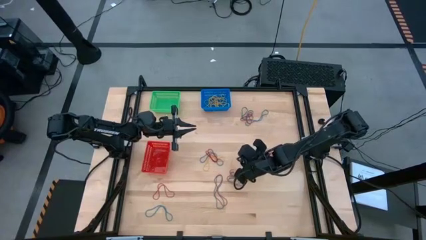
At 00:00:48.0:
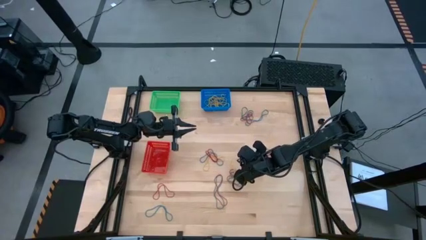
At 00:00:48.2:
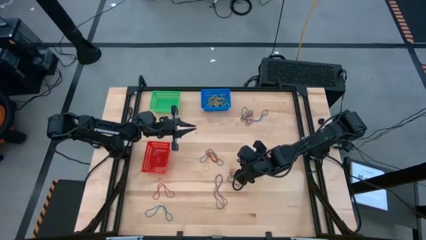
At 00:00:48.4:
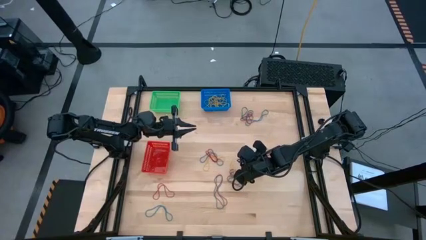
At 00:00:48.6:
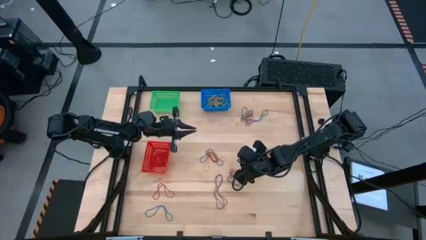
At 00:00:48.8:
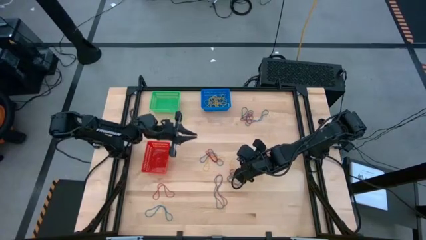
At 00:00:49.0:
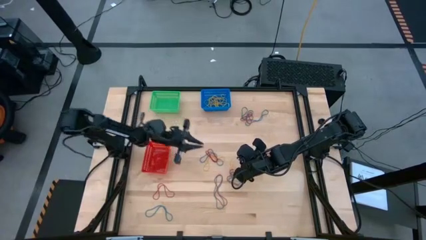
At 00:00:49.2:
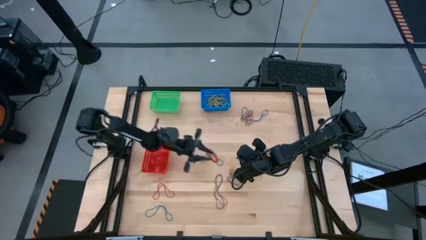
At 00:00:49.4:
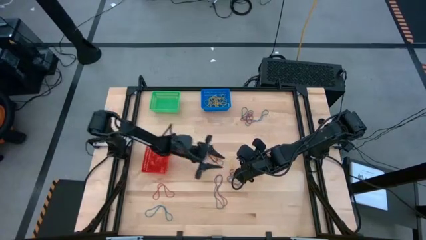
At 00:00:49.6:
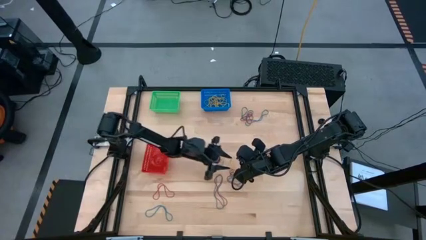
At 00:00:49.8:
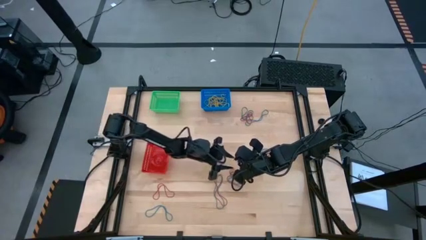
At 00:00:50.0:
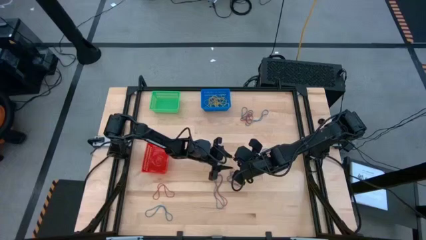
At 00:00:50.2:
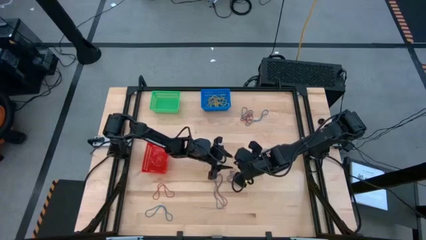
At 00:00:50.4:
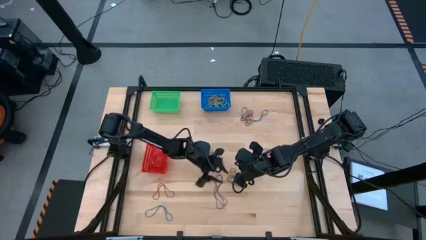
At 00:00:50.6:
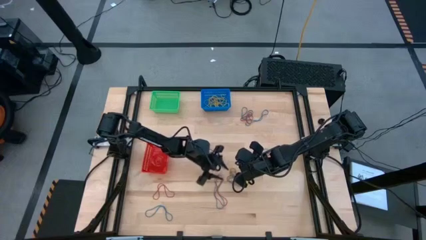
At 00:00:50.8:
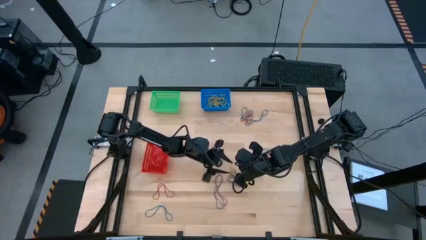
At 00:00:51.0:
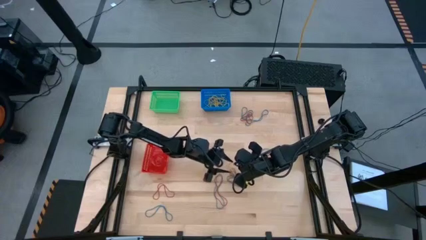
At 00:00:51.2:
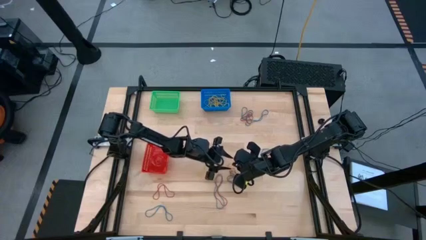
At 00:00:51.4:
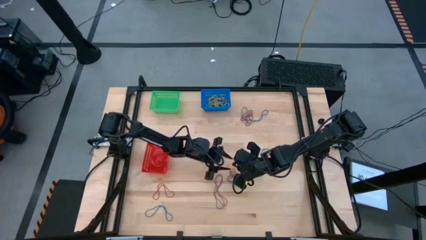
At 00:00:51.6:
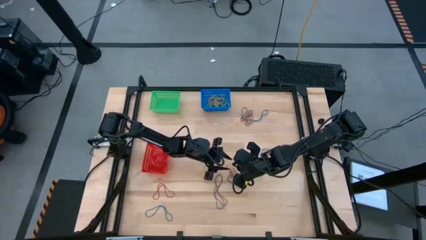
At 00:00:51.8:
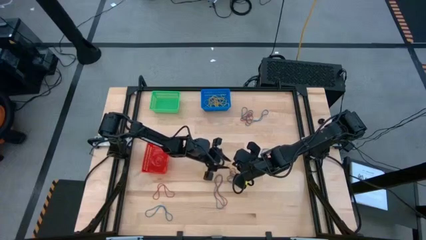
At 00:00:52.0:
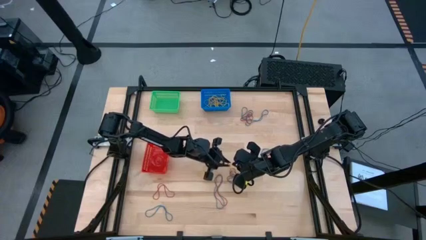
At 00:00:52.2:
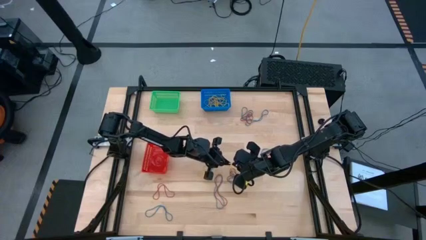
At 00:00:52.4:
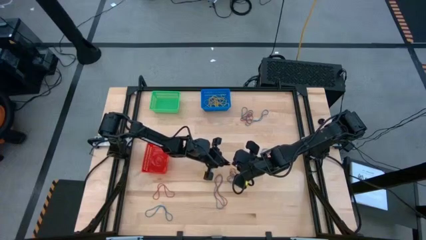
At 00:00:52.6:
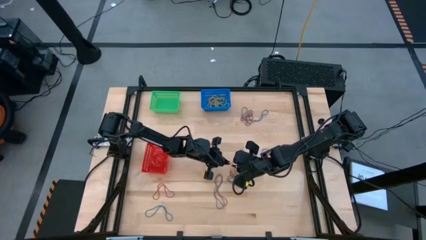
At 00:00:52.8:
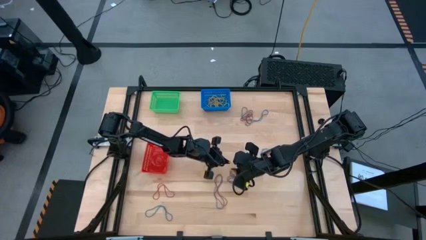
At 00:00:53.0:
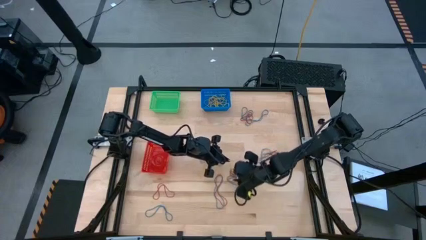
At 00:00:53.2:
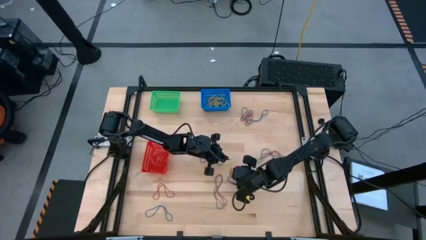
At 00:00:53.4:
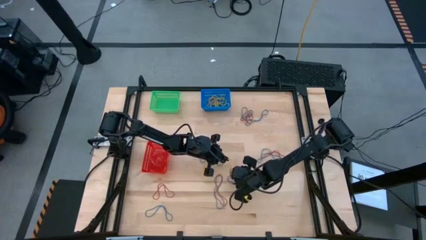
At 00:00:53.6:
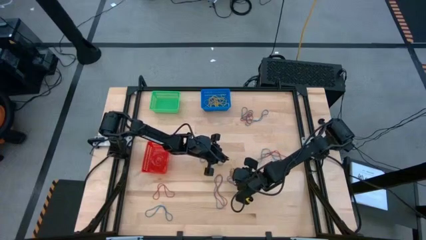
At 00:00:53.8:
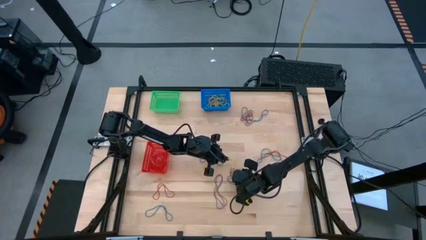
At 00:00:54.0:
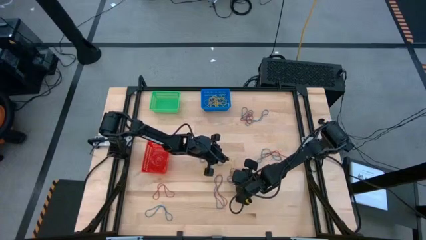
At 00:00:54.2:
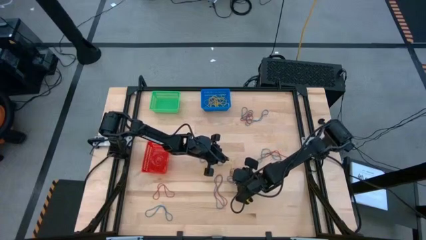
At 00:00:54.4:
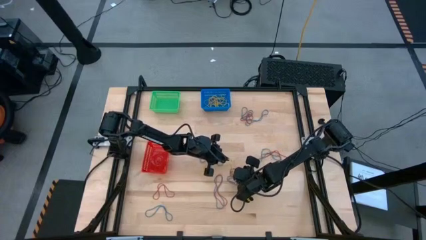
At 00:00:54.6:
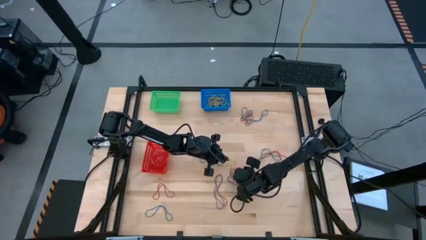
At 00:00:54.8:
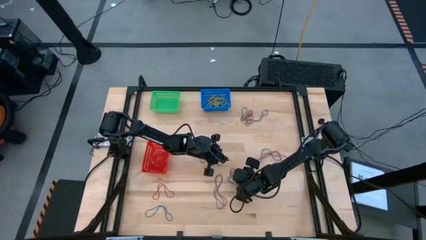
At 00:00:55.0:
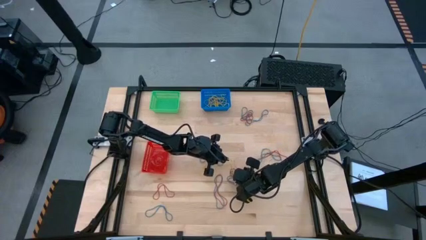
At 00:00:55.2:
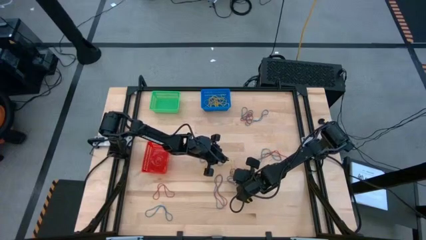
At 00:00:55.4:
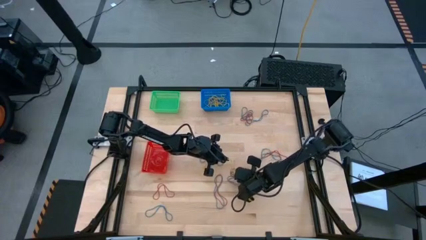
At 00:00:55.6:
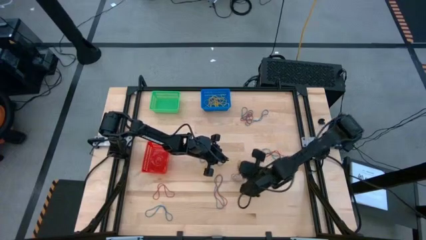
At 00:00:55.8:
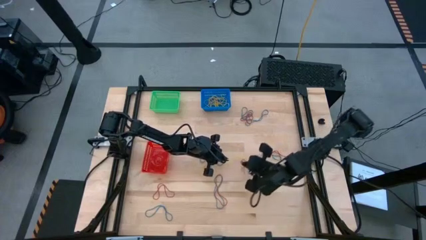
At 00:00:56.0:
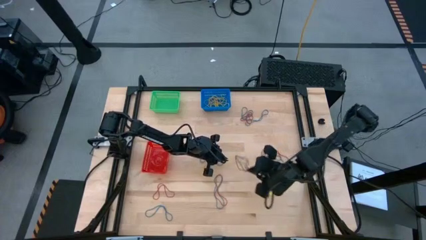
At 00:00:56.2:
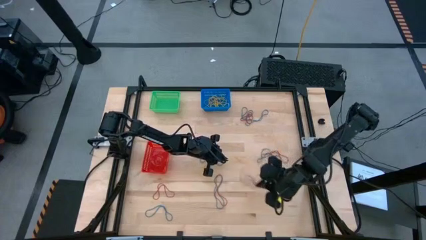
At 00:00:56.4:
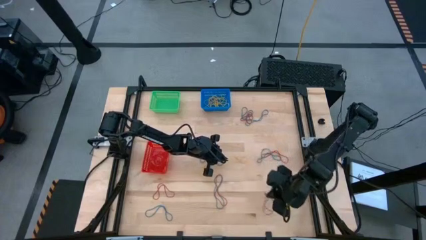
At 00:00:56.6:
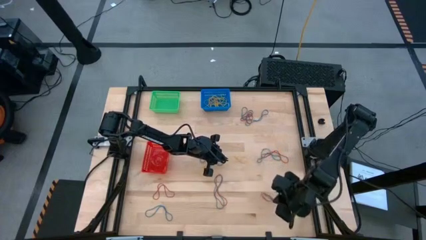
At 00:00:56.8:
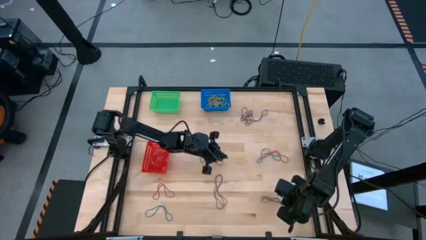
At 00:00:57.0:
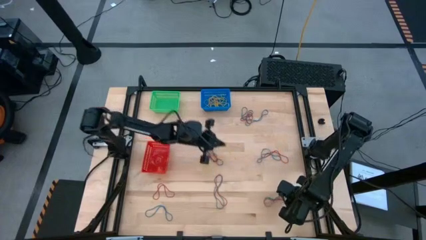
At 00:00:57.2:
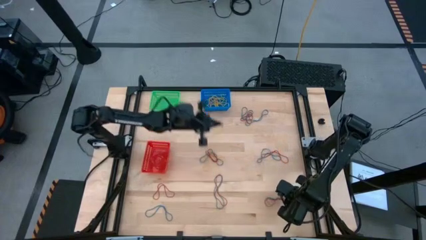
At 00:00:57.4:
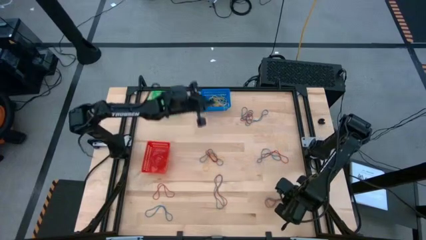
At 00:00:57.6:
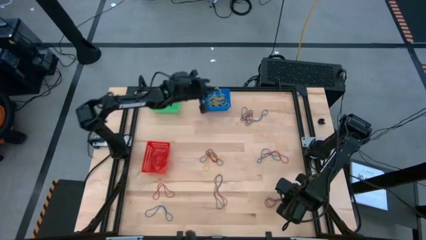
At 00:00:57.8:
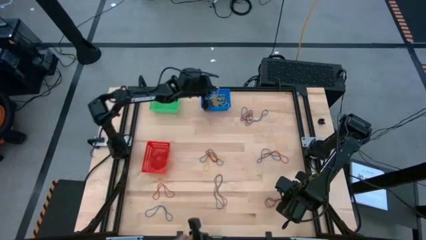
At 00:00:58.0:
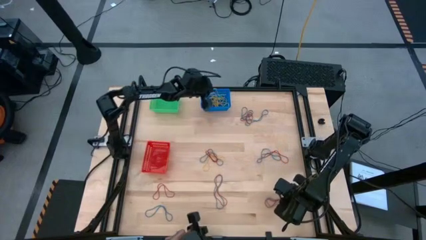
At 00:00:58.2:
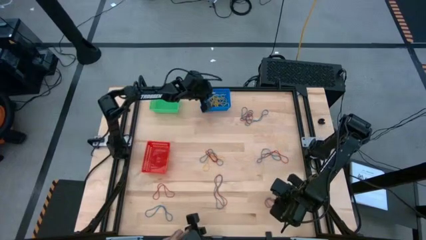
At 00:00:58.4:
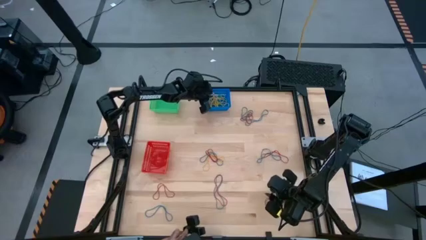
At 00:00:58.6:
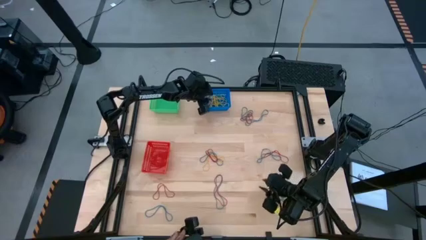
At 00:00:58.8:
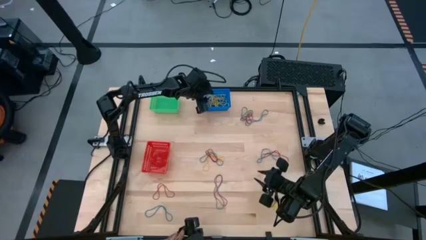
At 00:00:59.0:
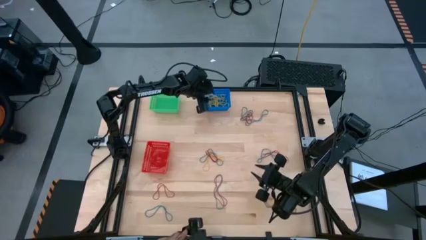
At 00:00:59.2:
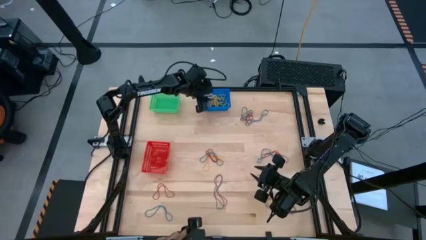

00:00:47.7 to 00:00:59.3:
Task: Sort rubber bands into baskets
Put the yellow rubber band into the blue bin

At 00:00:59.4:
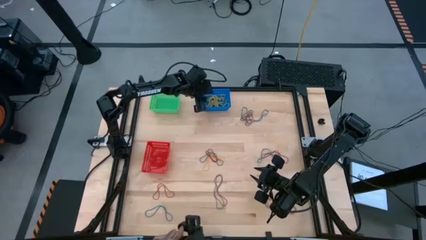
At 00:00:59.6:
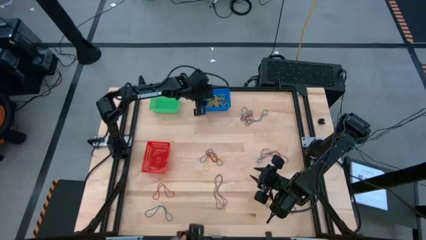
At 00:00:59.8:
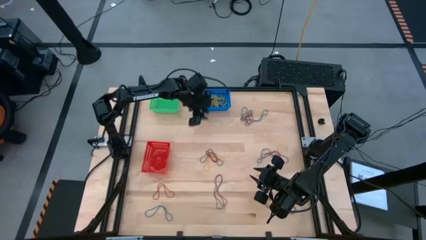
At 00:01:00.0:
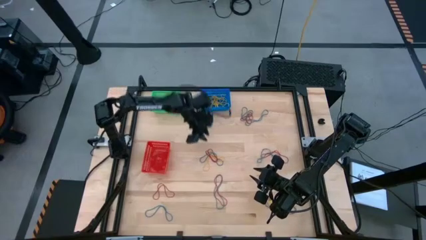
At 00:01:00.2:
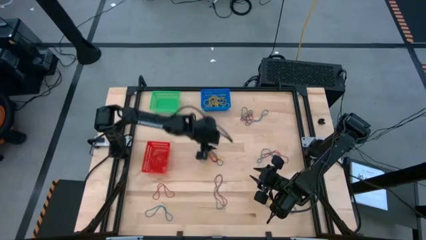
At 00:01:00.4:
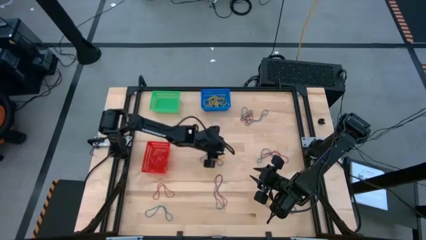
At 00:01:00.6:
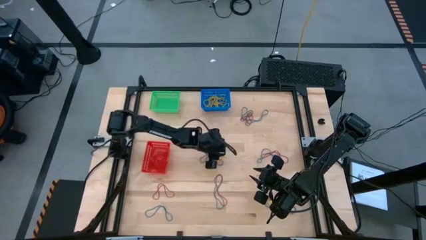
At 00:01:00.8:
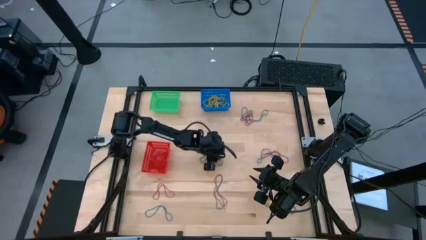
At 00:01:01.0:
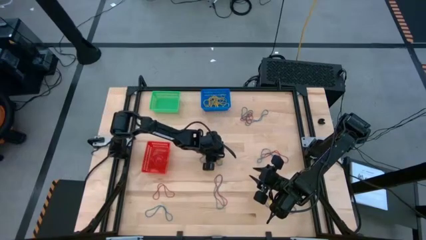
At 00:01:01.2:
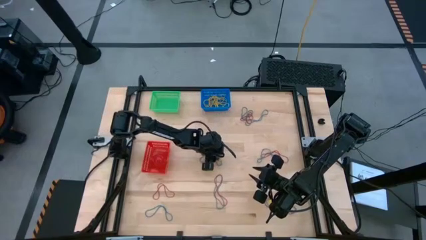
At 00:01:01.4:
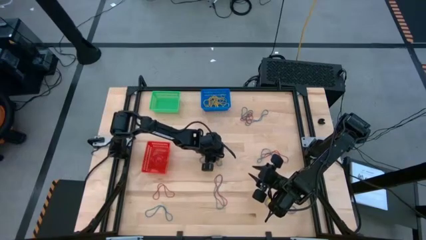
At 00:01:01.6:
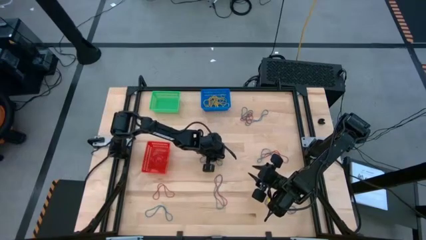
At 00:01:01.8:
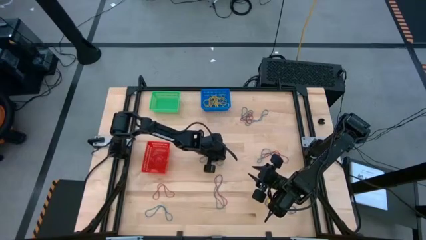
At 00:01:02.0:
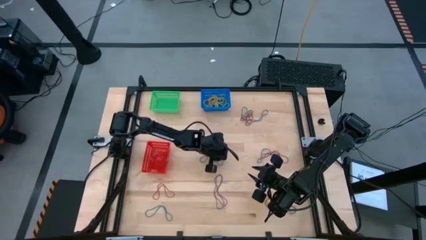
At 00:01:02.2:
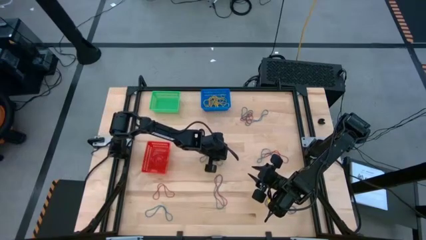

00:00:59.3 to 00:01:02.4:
Put the yellow rubber band into the blue bin

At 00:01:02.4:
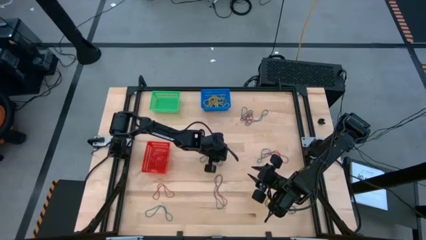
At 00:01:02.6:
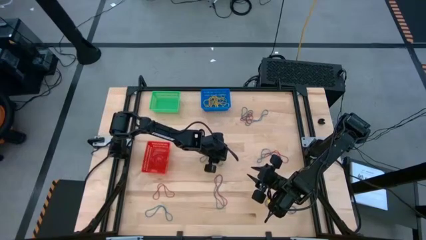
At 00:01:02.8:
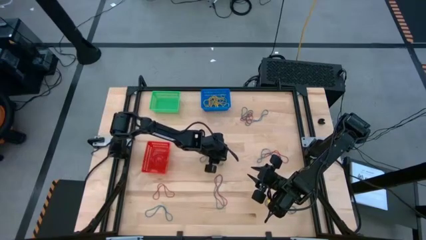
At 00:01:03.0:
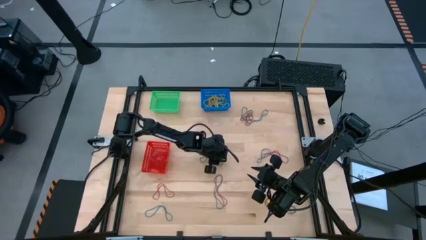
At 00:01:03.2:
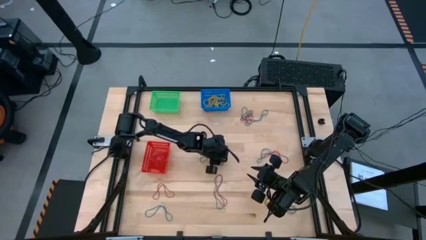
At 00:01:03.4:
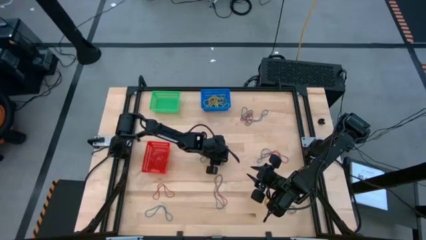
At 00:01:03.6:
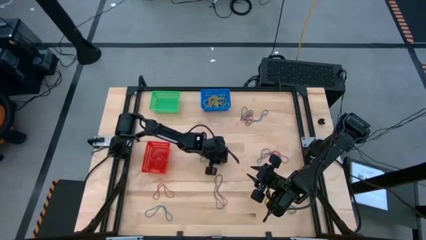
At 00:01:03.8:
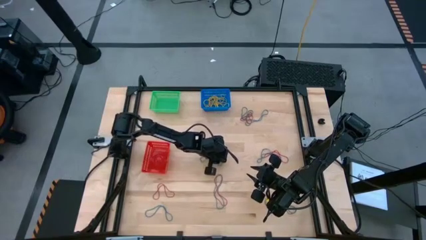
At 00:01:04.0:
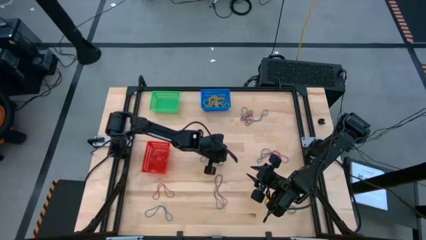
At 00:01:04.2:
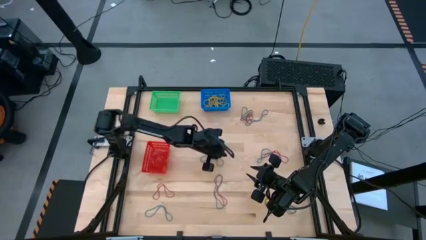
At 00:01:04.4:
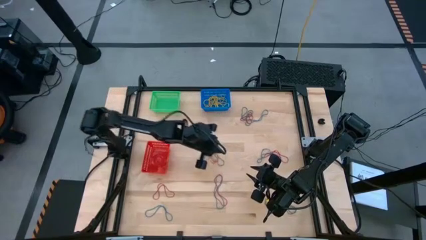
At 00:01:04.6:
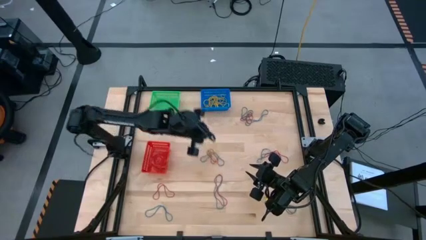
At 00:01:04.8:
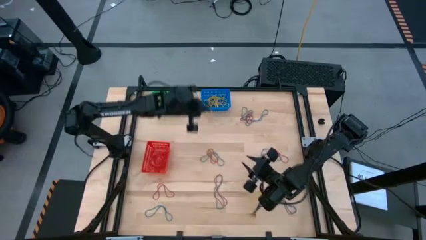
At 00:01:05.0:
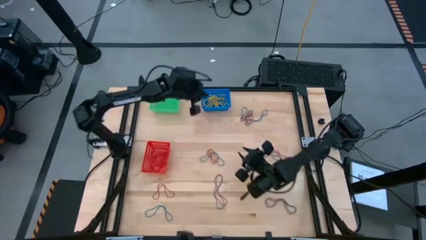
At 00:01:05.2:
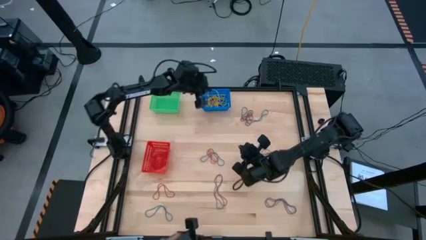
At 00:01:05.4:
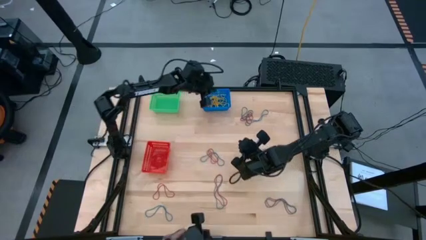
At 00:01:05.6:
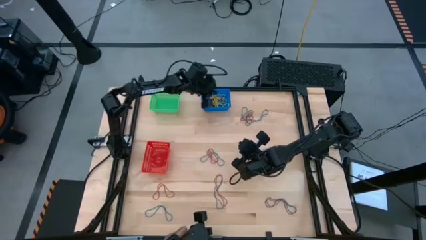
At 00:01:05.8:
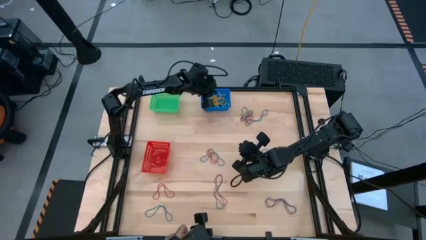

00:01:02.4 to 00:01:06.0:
Put the yellow rubber band into the blue bin
